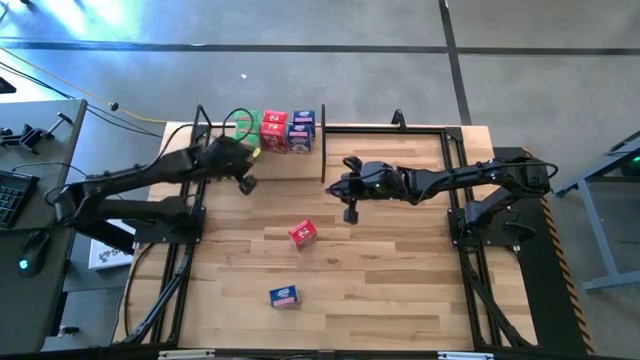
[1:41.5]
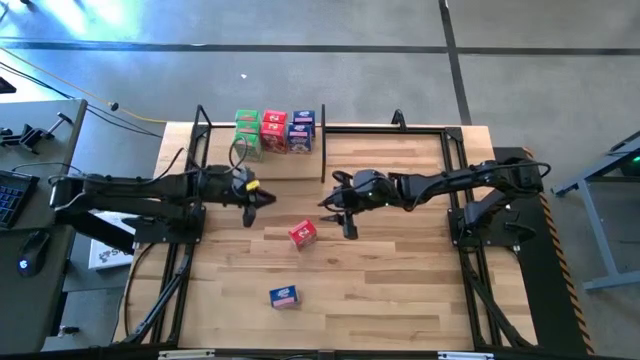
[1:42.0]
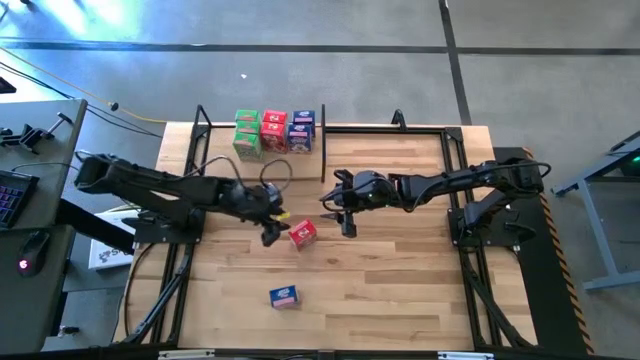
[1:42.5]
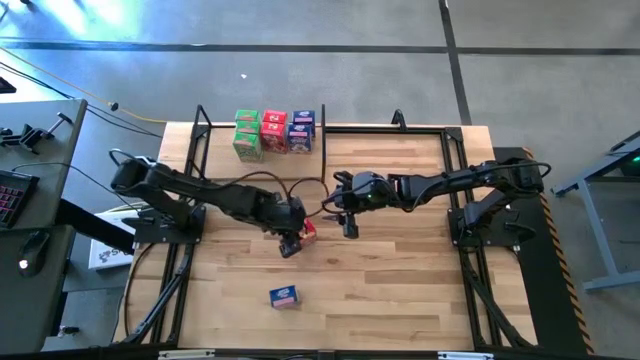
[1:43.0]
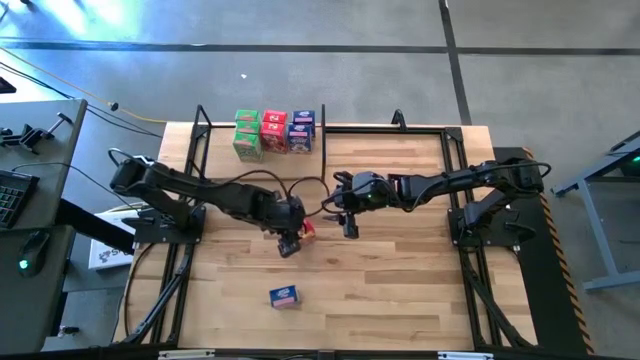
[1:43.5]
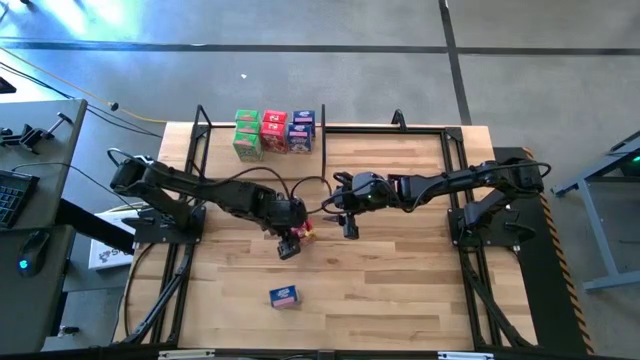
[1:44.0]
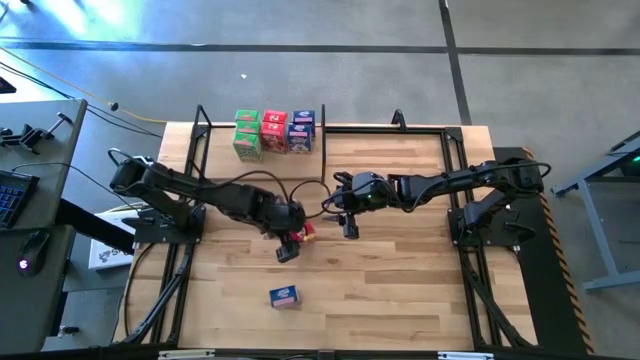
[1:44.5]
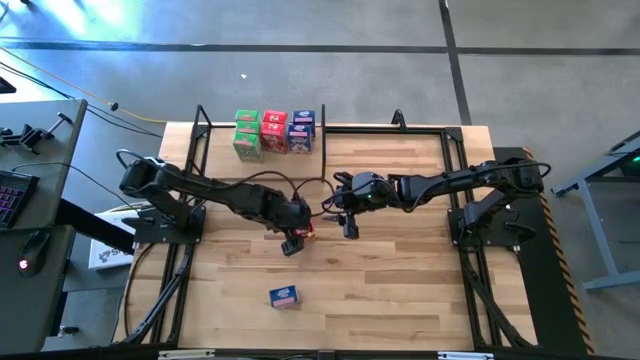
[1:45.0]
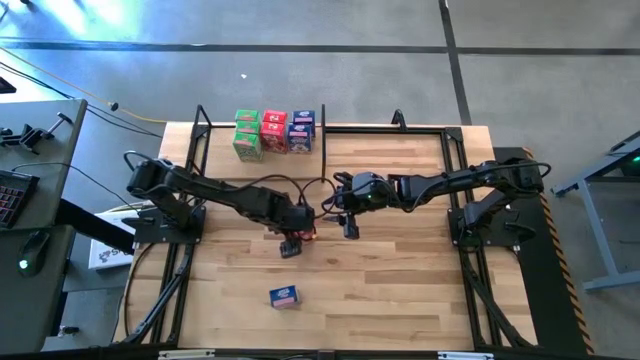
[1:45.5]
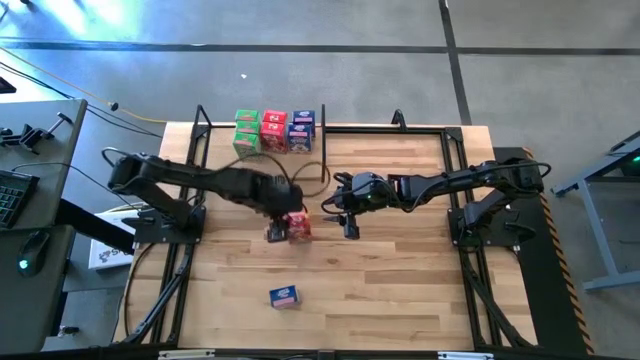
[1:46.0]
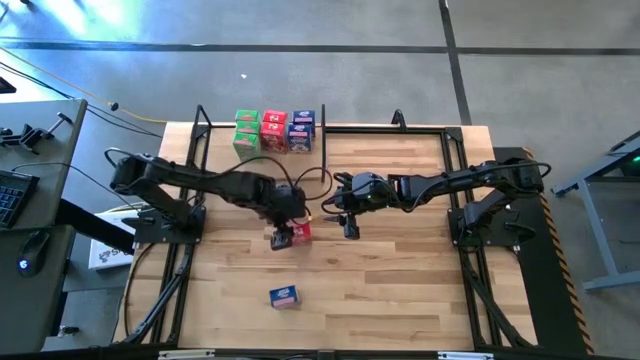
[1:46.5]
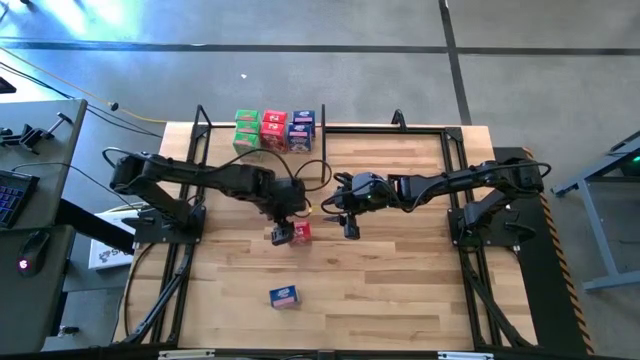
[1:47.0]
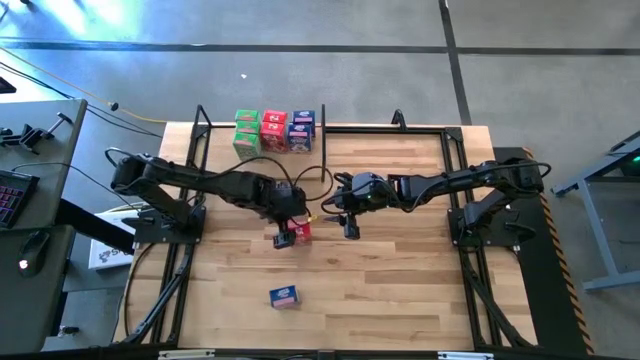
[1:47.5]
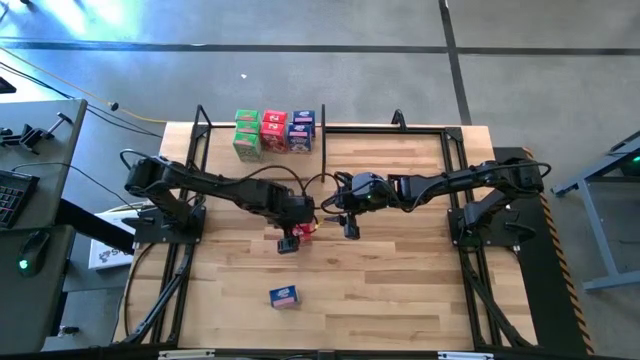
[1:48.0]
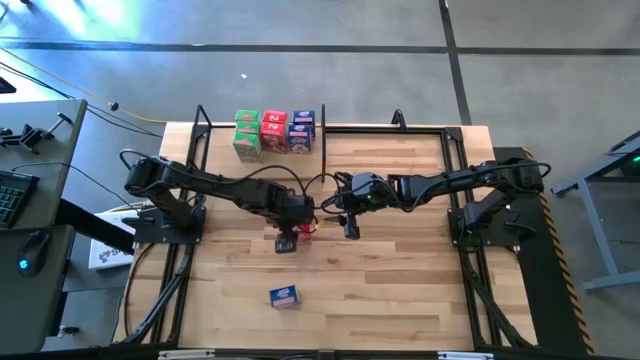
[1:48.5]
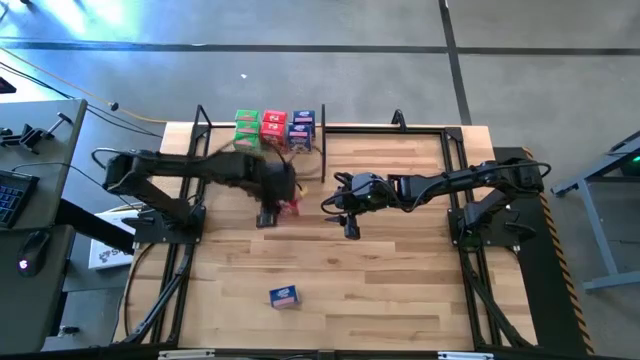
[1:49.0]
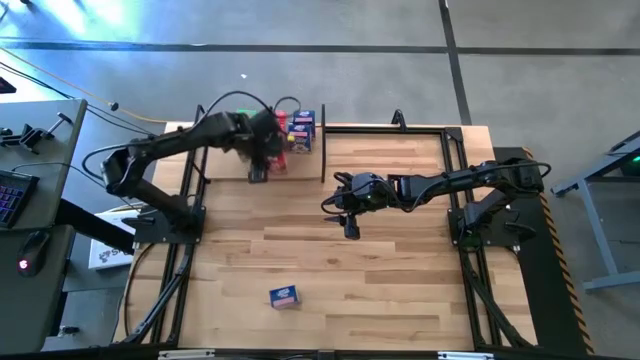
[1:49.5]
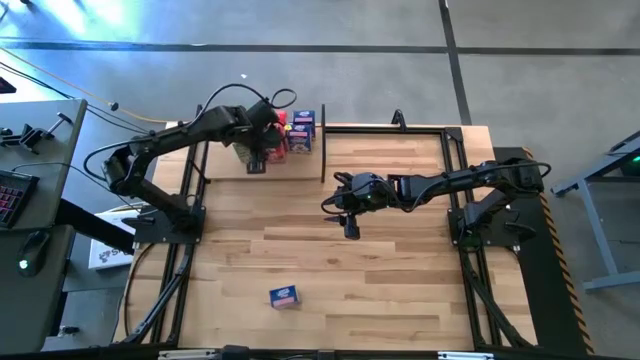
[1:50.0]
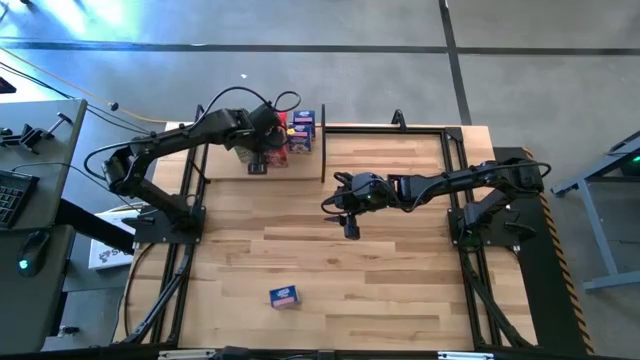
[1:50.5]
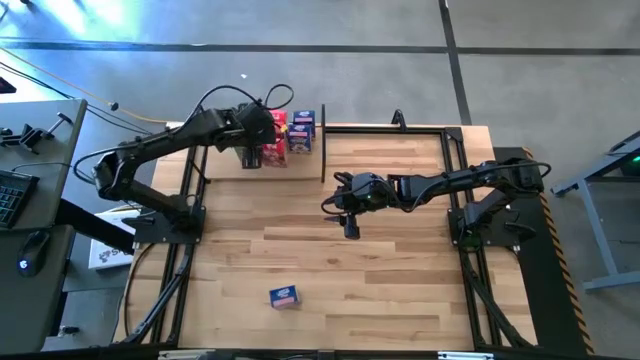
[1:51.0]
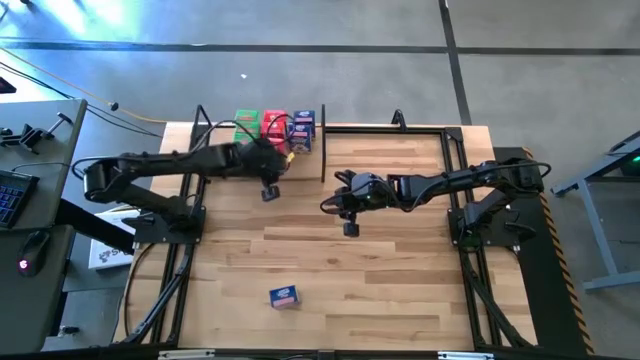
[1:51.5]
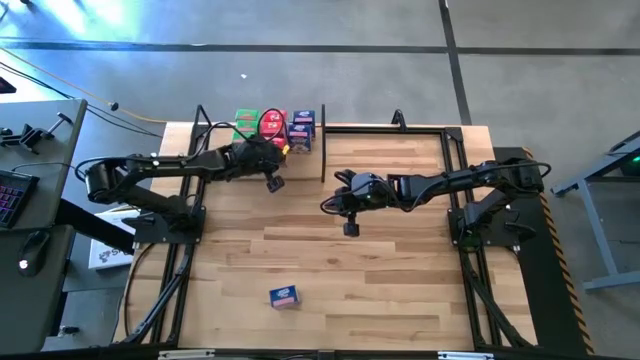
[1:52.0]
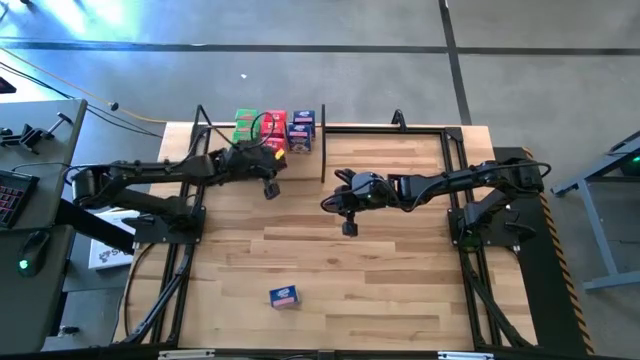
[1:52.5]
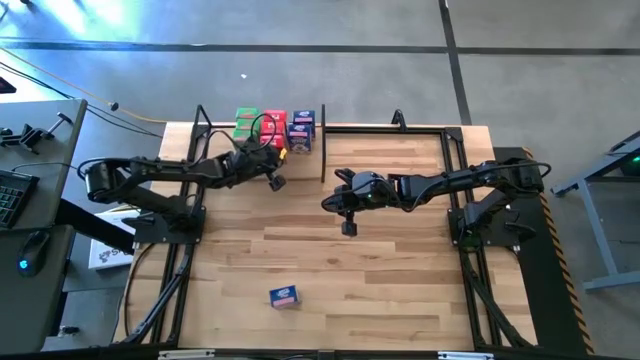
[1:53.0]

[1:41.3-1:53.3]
Task: Stack cereal on shelf
Put the red cereal box on the shelf aligned with the red cereal box

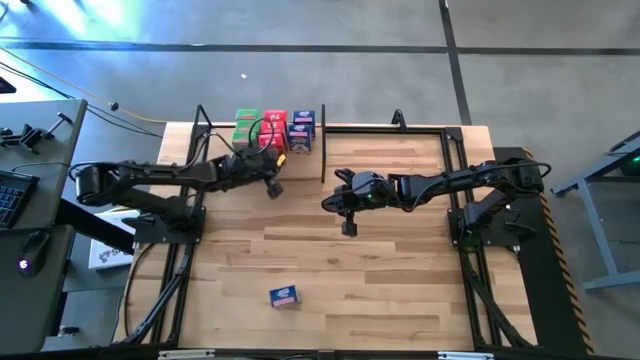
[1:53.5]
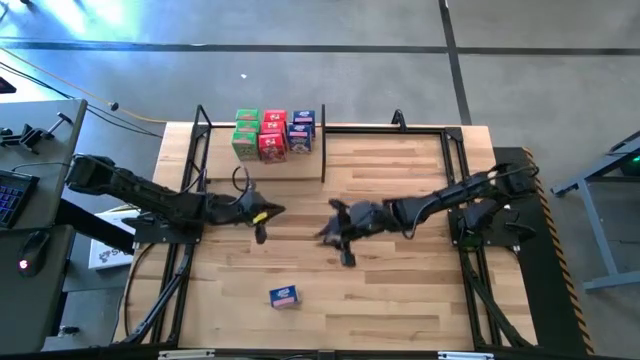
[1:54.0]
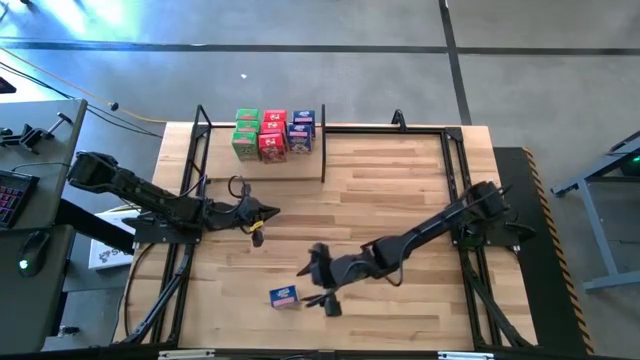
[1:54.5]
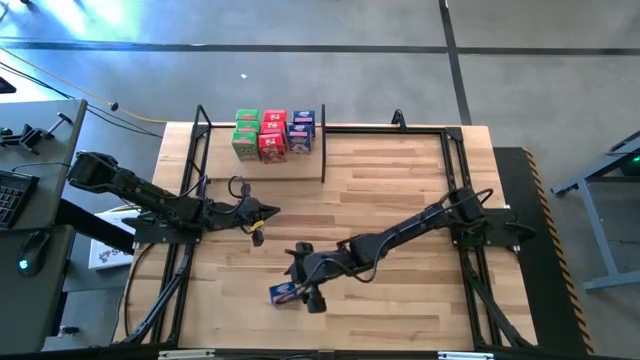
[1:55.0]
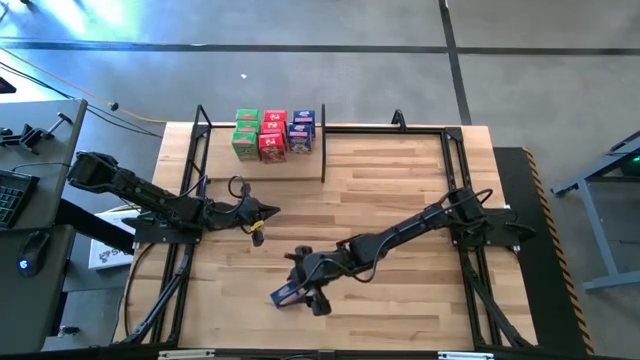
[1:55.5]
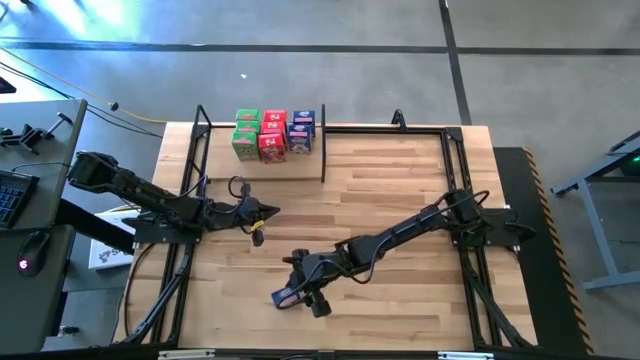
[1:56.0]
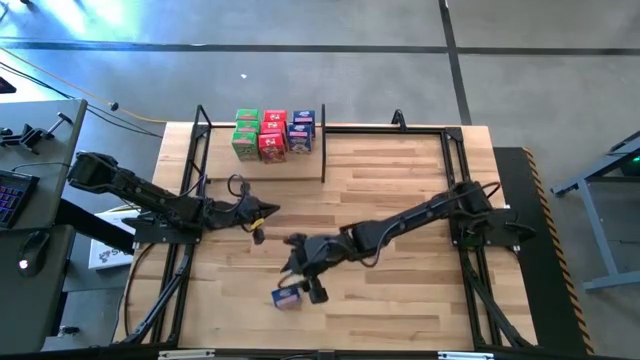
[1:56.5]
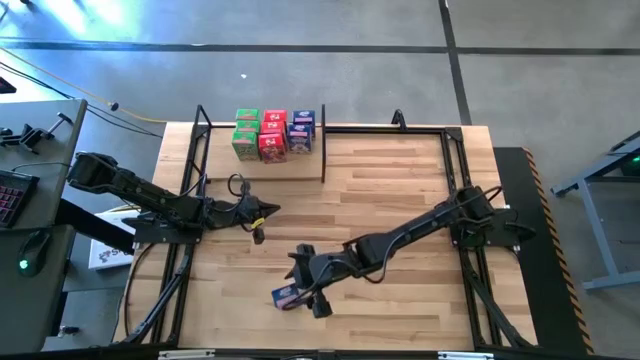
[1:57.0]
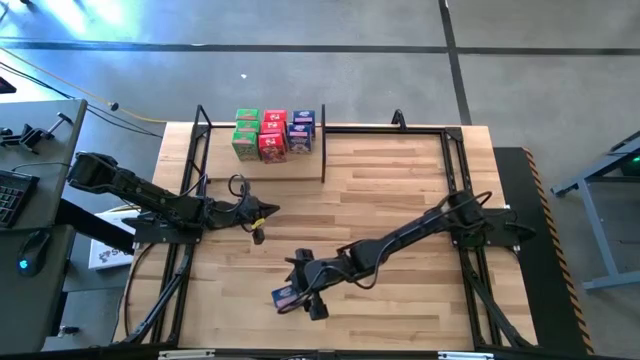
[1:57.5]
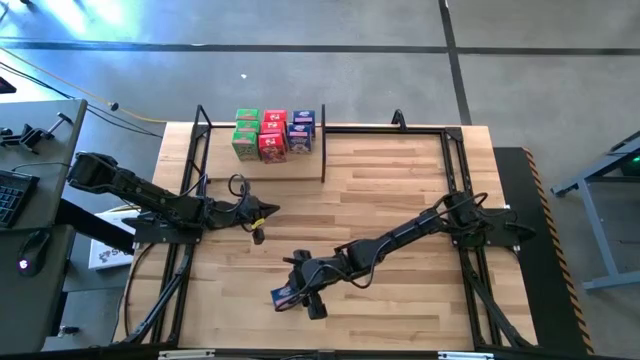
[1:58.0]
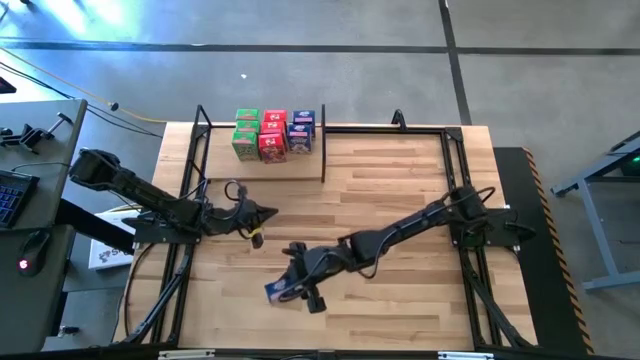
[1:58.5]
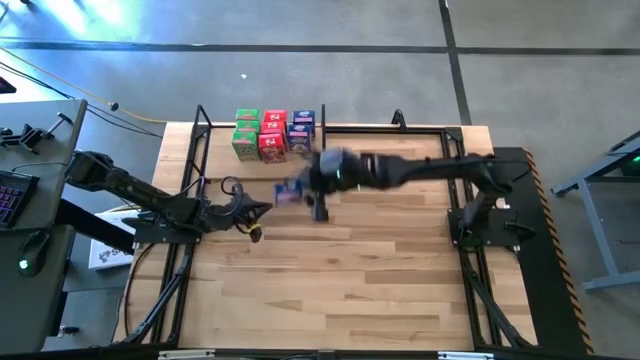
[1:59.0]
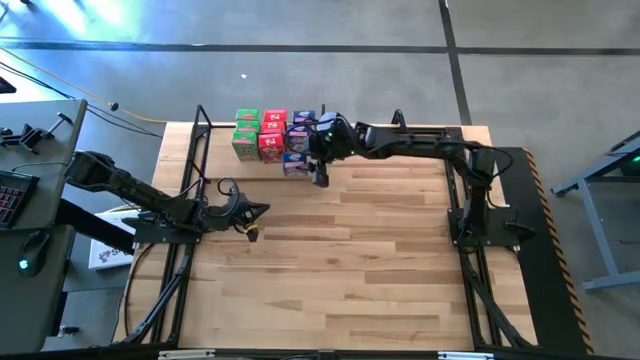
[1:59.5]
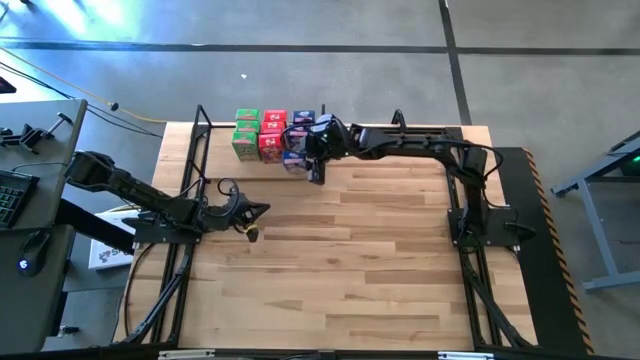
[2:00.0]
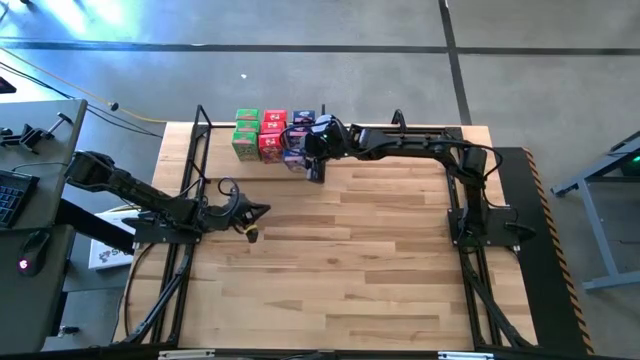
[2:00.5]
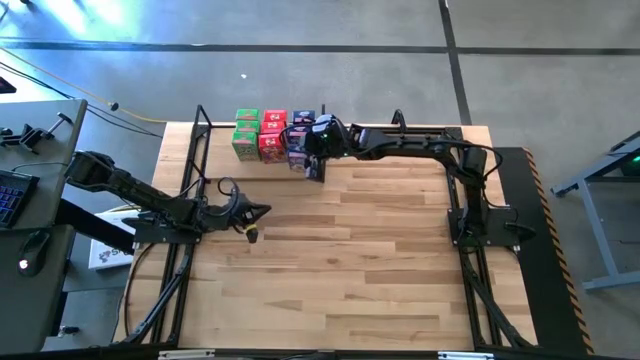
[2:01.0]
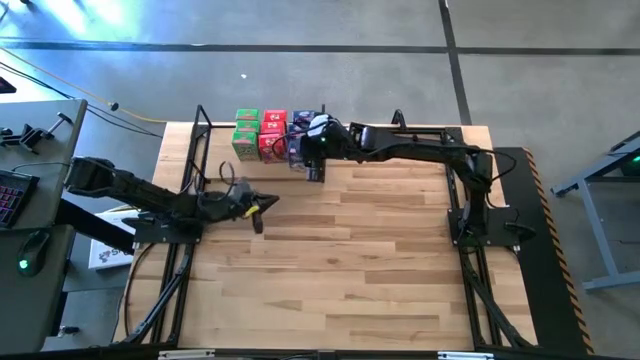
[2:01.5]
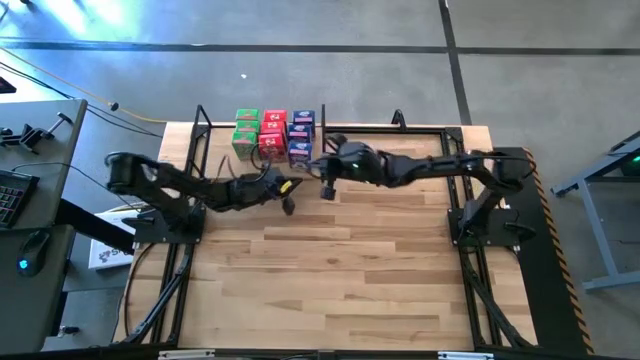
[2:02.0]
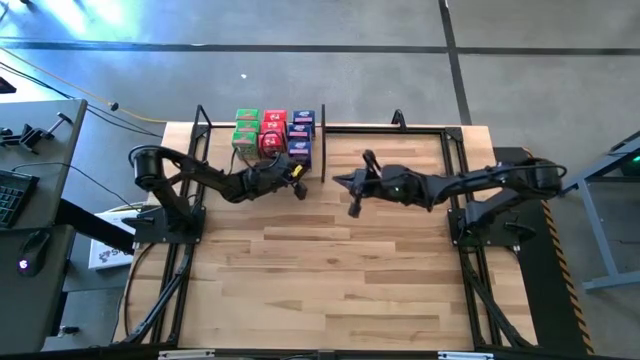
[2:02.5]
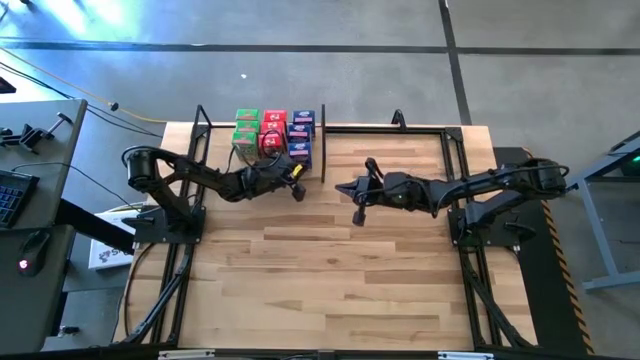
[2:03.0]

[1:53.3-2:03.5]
Put the blue cereal box on the shelf aligned with the blue cereal box
